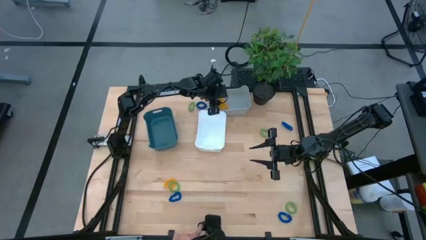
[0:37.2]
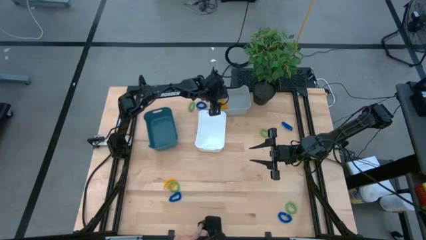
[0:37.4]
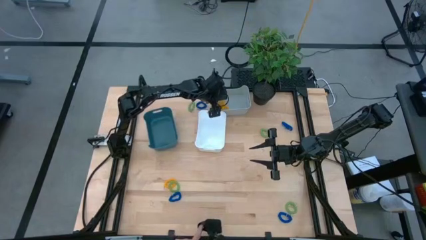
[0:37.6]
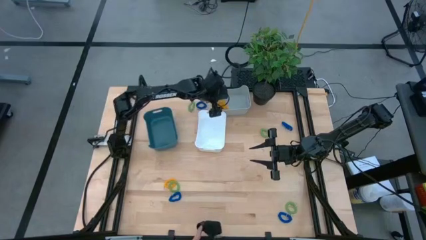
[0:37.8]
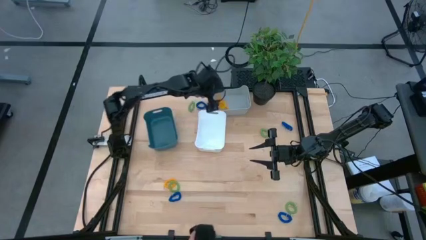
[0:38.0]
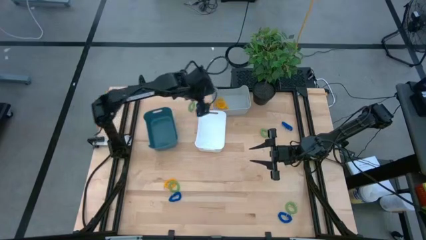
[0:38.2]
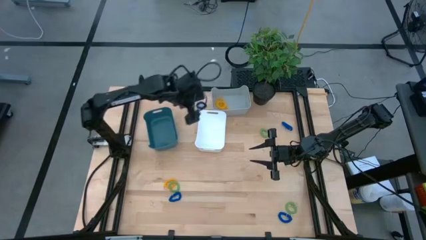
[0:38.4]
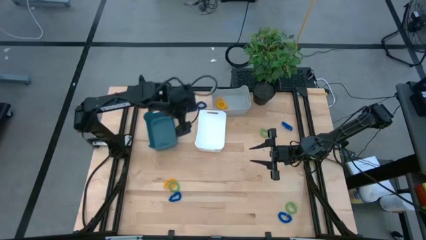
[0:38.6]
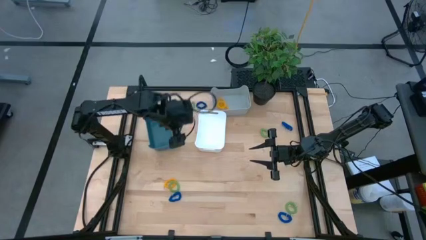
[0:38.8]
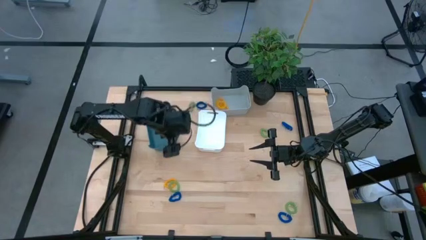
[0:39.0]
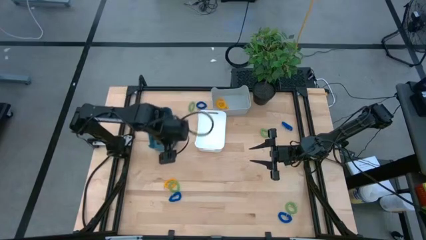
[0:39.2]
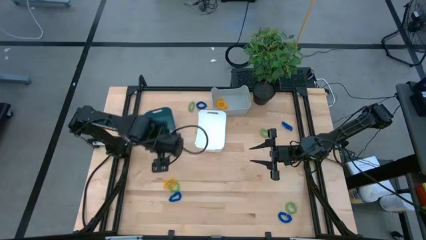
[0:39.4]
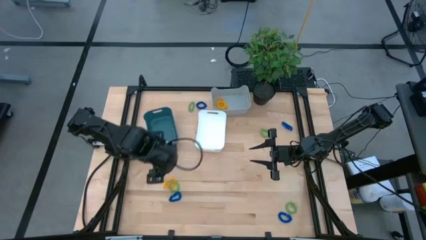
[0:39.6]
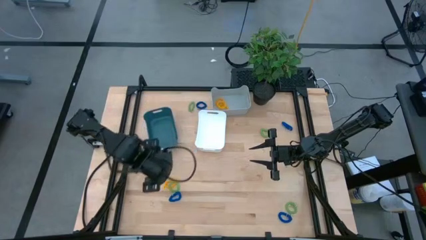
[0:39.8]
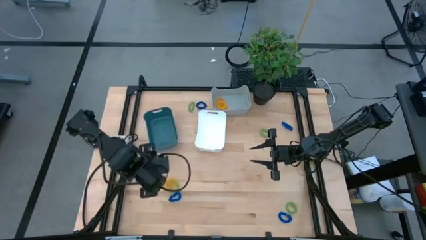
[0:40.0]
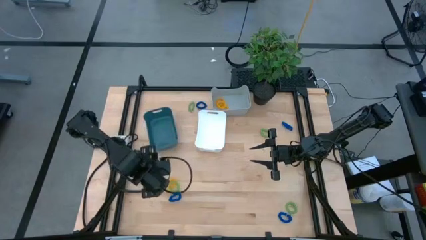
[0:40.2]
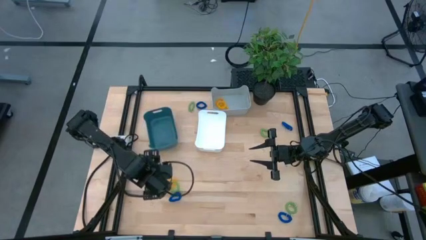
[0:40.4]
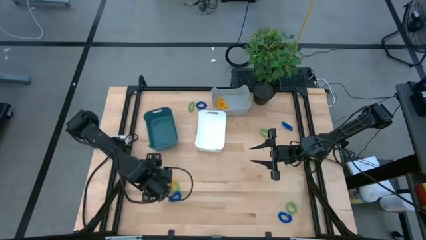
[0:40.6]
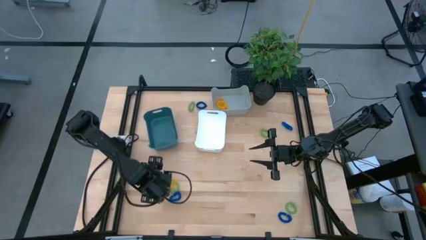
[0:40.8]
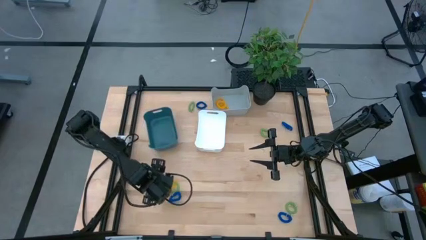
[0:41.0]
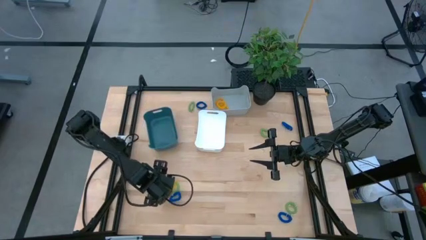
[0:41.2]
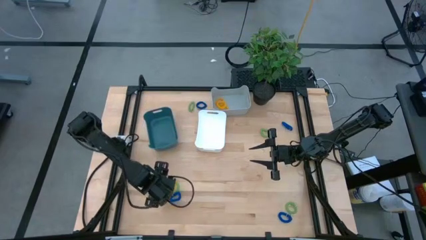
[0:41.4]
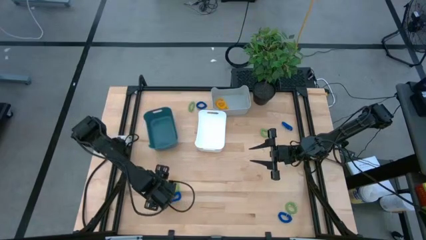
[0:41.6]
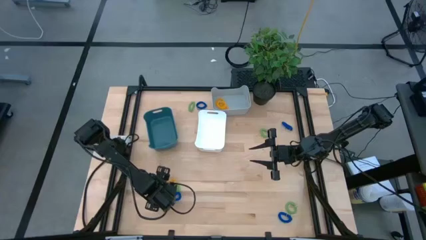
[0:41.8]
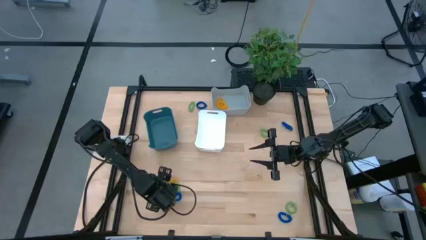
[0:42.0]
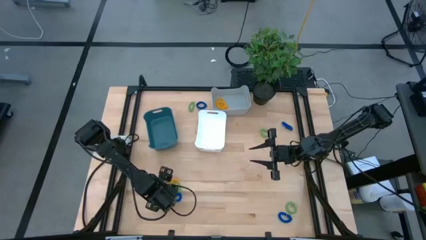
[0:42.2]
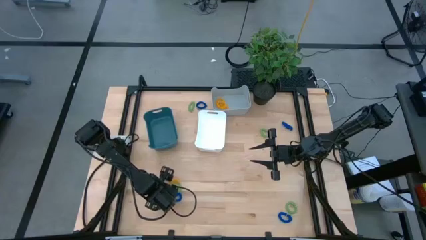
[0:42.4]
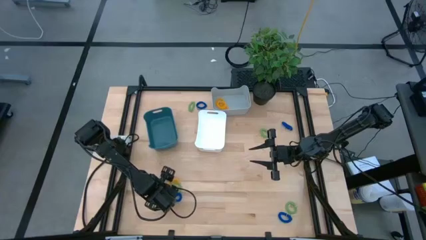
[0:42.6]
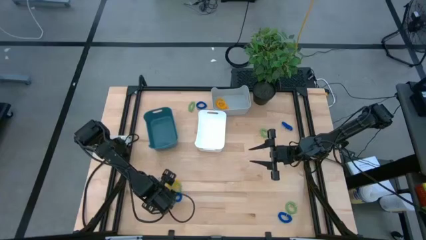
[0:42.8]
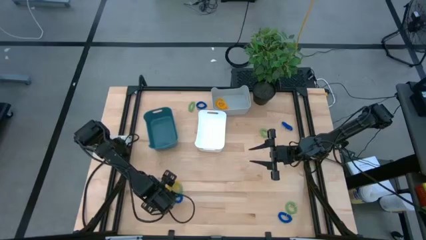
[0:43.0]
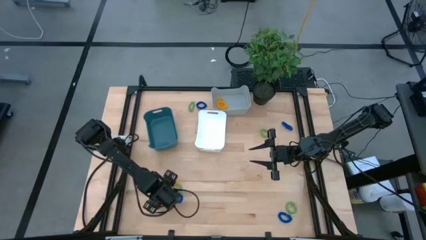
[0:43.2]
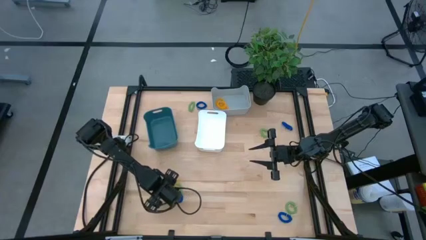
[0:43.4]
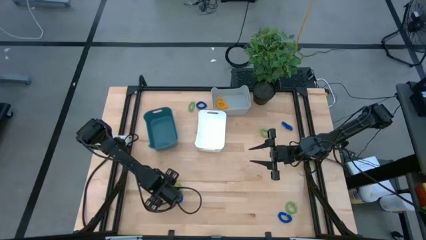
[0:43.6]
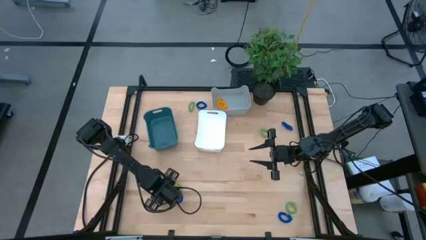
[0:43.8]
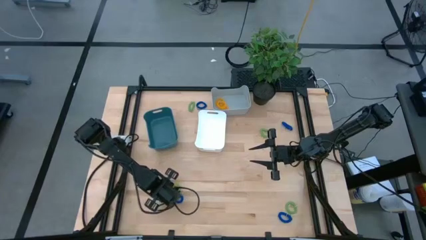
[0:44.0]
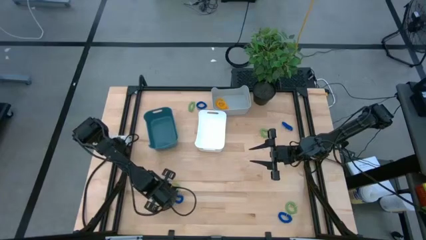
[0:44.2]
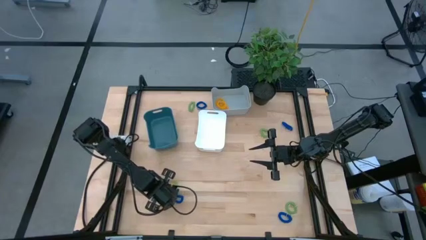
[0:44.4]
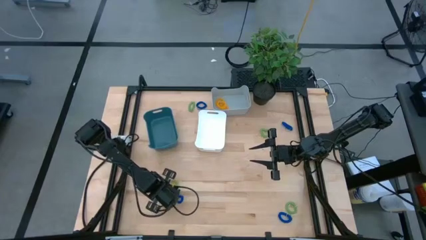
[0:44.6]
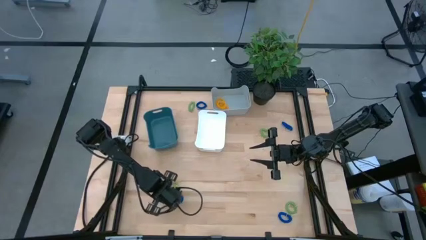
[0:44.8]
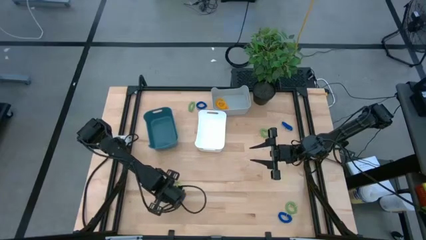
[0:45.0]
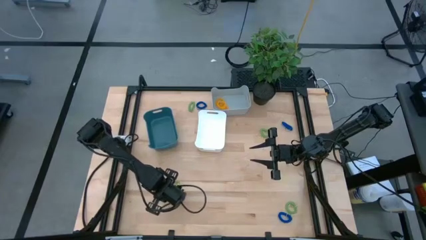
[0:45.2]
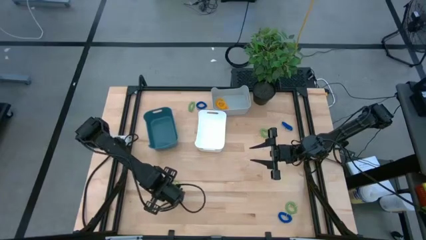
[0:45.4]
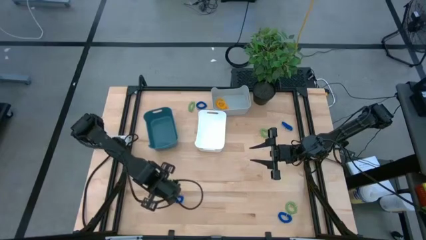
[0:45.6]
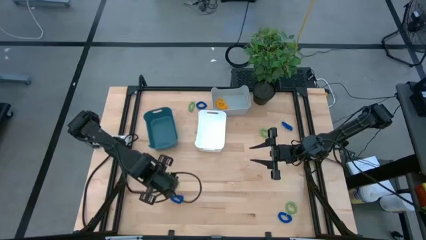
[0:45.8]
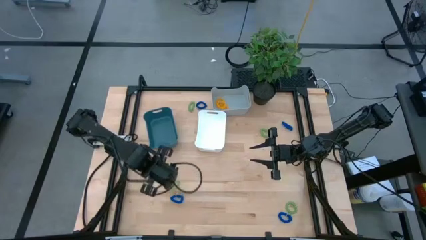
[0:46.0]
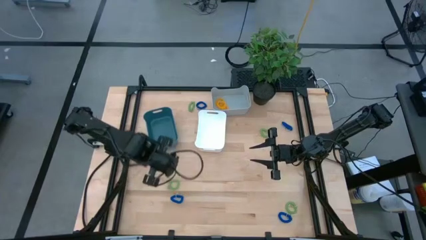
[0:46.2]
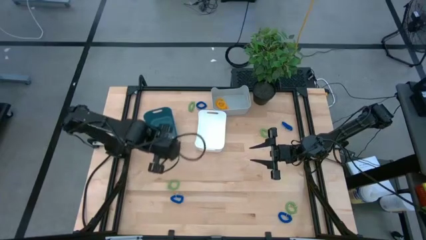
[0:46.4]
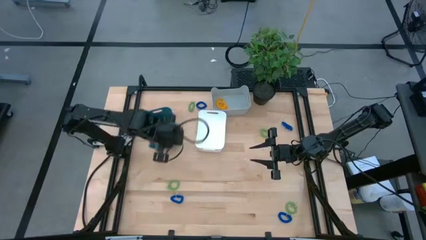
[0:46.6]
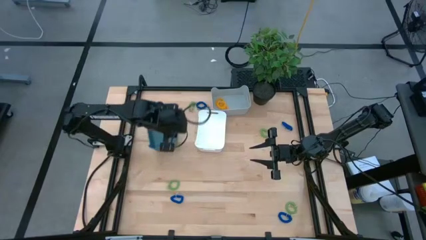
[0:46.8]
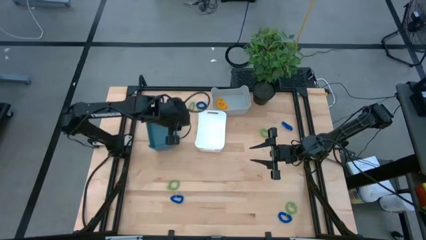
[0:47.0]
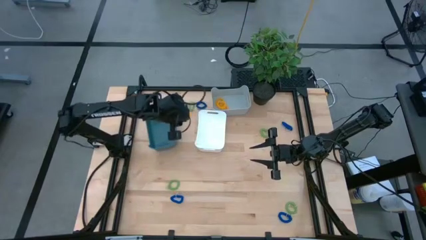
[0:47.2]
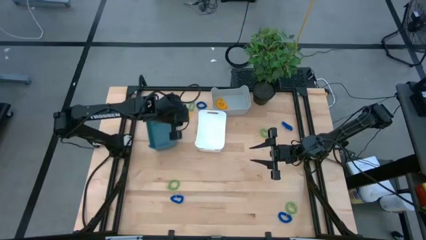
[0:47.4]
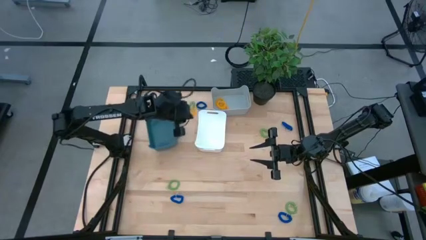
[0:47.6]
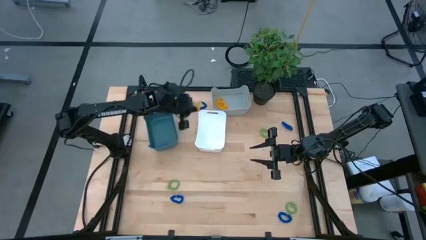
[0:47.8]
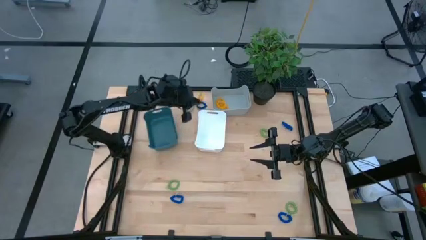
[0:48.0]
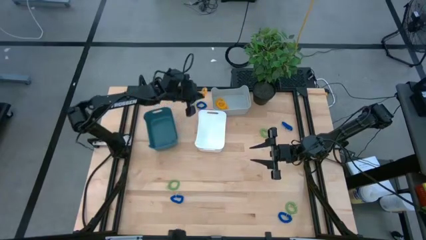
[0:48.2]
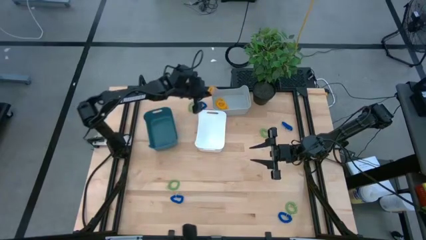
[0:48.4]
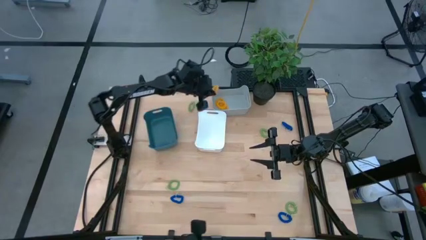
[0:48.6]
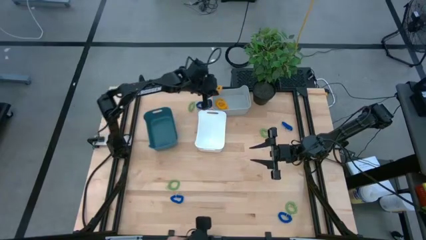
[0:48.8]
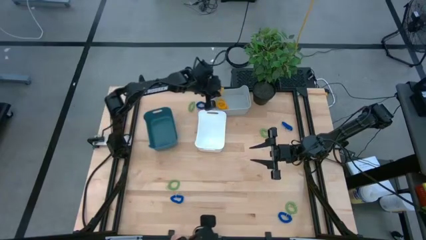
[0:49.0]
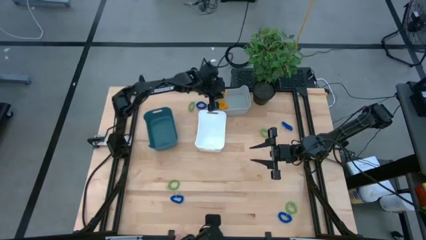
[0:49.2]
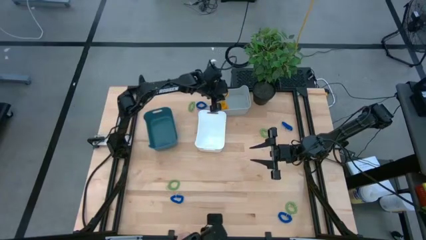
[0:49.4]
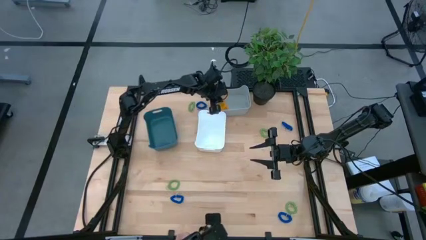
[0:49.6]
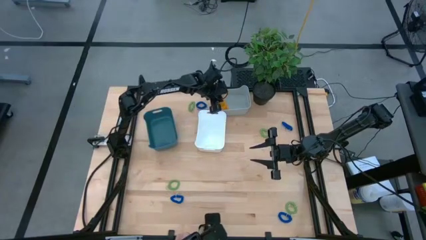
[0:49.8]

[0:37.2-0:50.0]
Task: Sort spring keychains
Put the yellow spring keychain into the gray bin

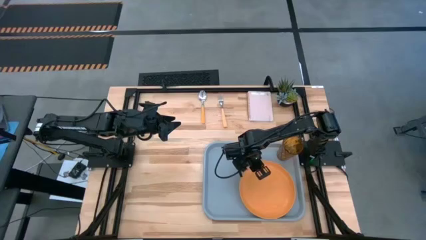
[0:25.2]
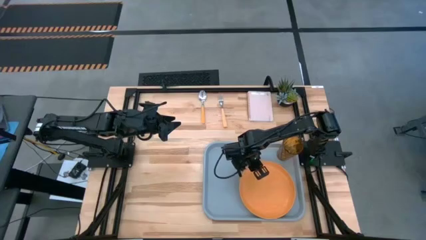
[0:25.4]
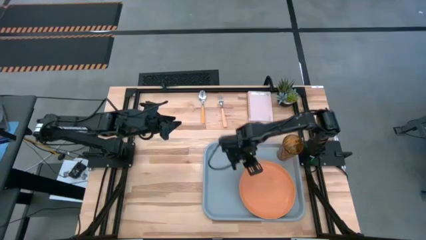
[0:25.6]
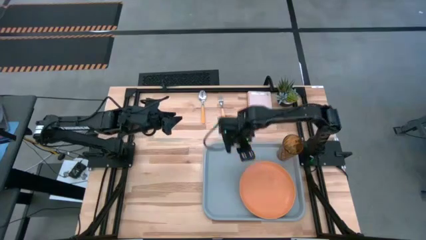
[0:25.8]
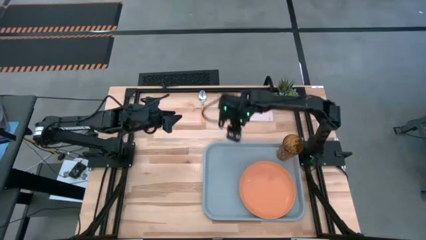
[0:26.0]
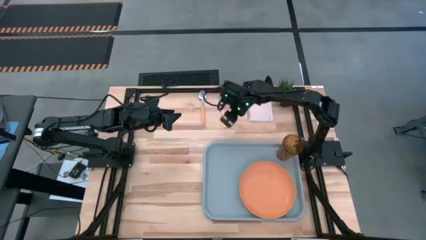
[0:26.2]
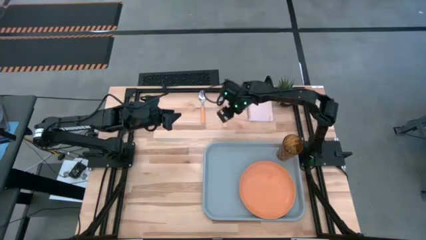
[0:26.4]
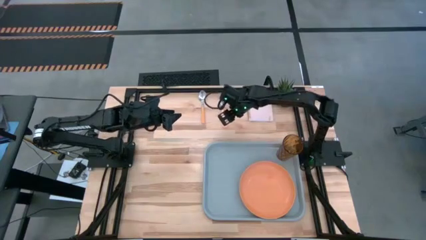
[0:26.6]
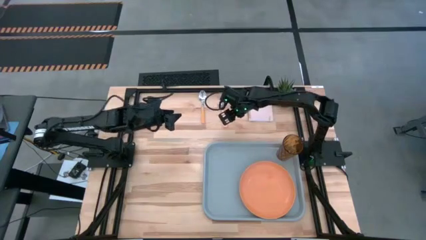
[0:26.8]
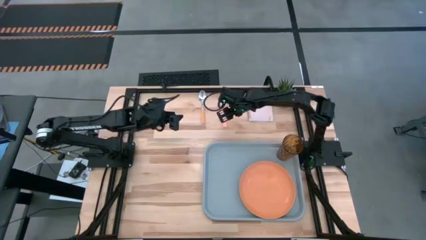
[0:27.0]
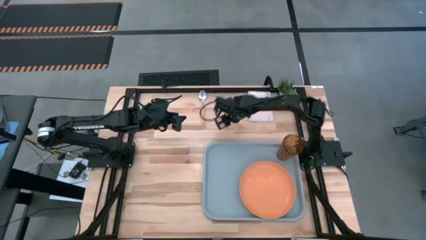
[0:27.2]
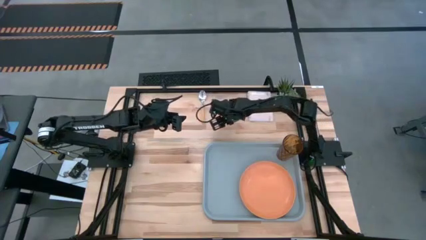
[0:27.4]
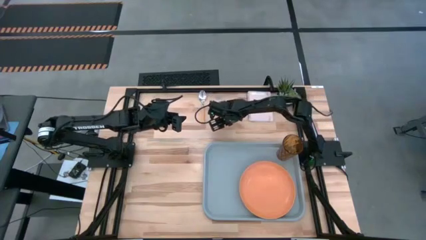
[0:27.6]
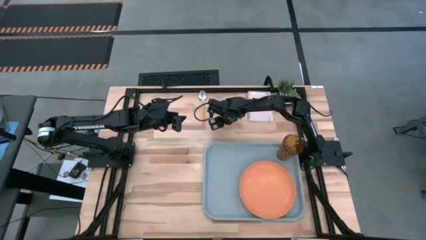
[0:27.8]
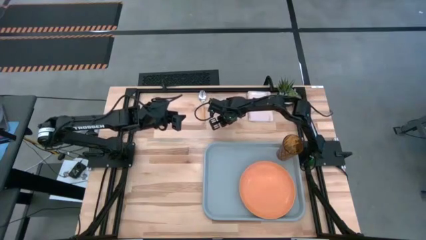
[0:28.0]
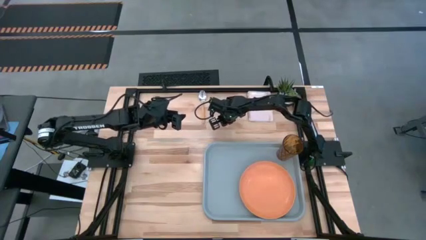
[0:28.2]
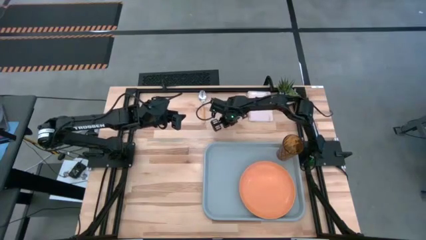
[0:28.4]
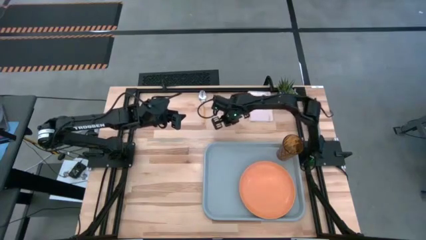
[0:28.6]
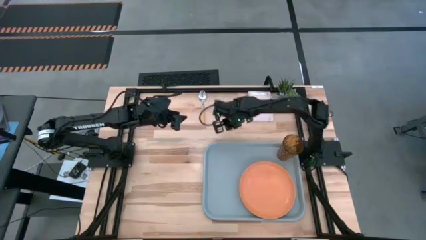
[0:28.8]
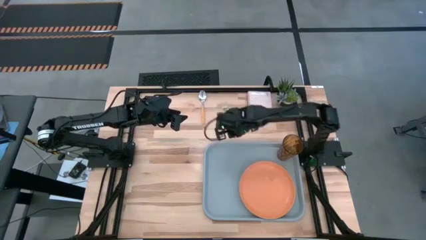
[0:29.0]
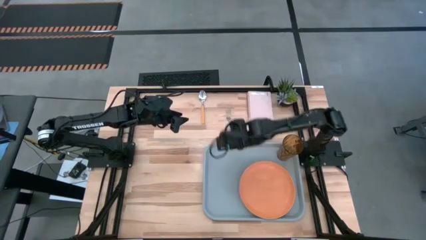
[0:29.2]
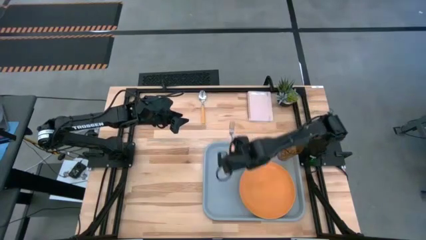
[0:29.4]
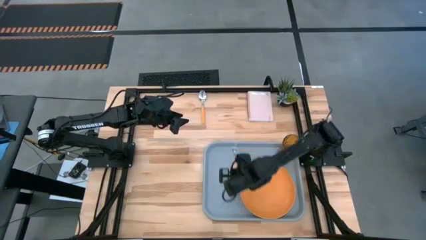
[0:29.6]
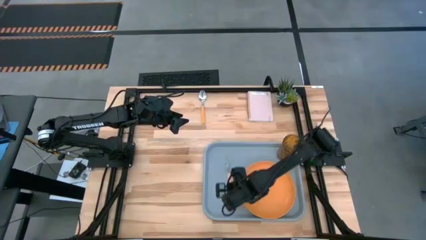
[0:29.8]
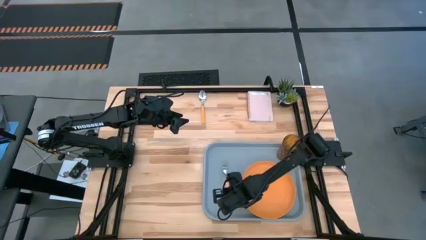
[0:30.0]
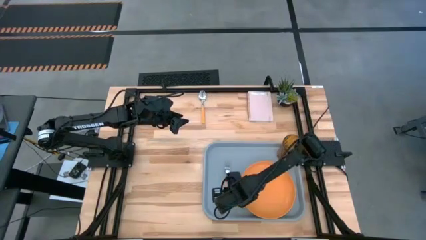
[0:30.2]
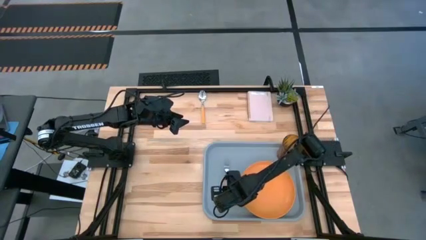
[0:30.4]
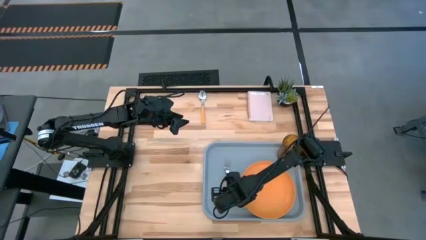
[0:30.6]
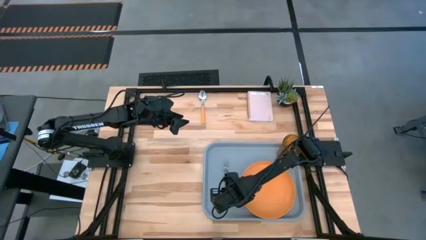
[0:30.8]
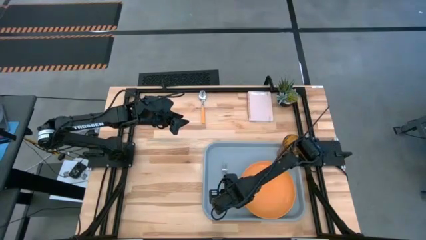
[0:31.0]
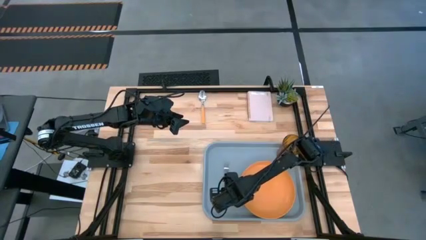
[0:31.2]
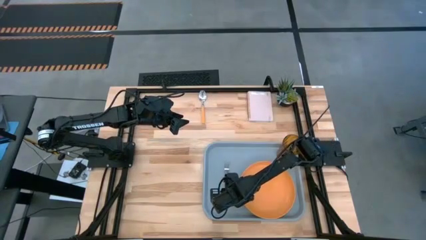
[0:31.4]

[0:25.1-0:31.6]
Task: Pick and place plate/cup/fork/spoon on tray
Put the orange fork on top of the gray serving tray, beside the left side of the orange plate
